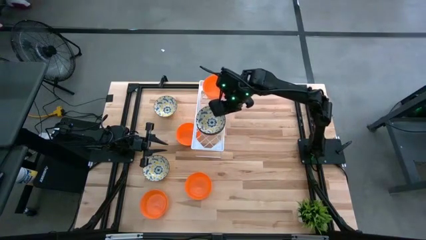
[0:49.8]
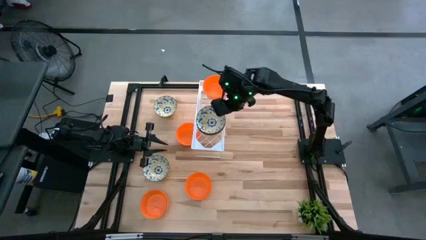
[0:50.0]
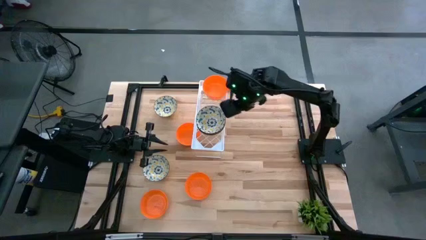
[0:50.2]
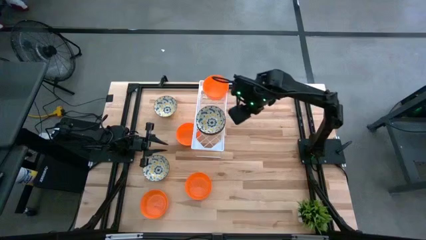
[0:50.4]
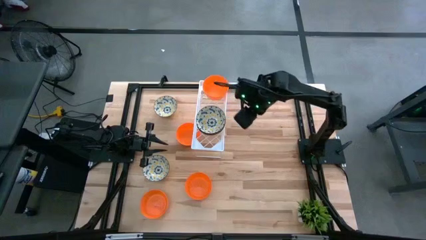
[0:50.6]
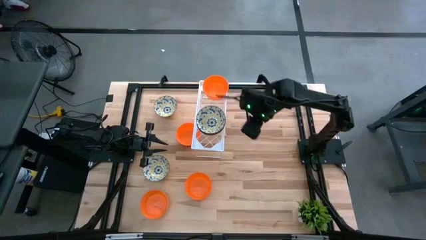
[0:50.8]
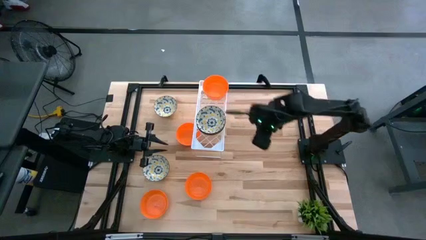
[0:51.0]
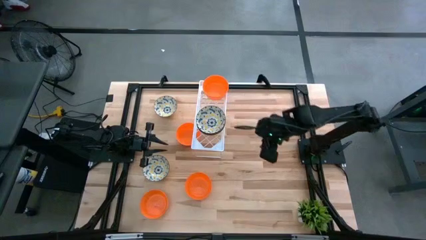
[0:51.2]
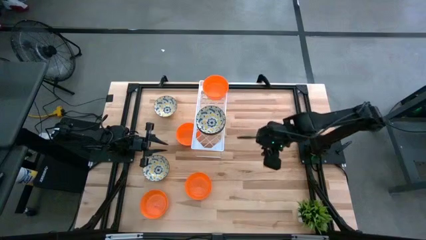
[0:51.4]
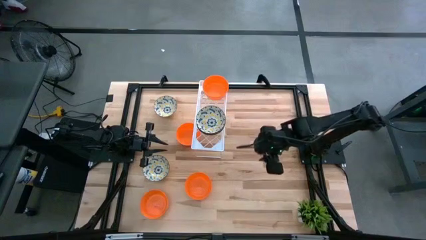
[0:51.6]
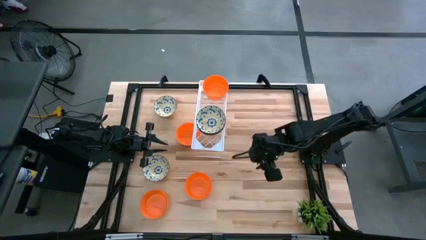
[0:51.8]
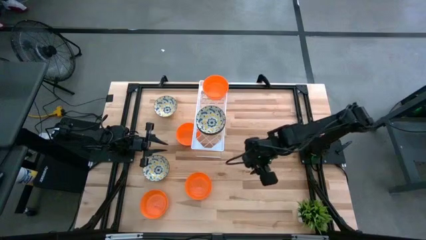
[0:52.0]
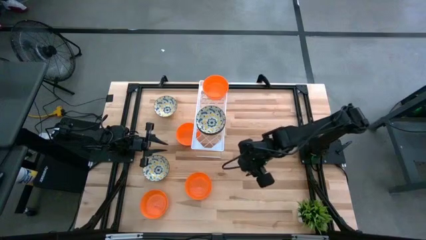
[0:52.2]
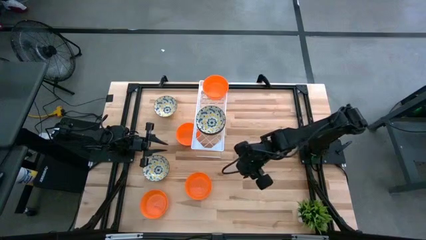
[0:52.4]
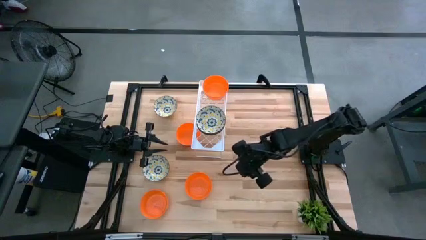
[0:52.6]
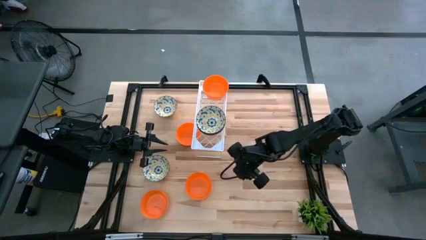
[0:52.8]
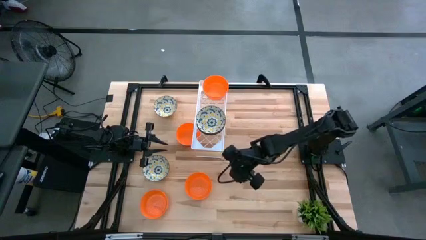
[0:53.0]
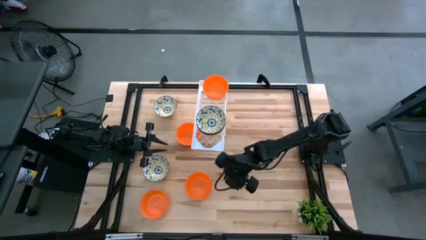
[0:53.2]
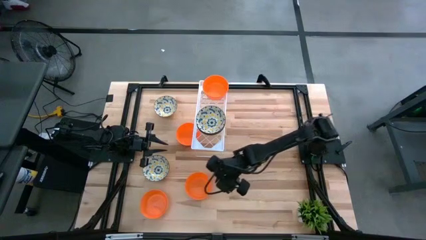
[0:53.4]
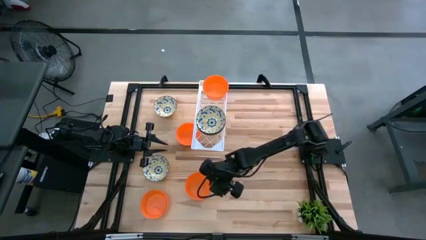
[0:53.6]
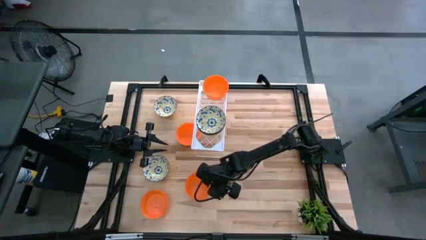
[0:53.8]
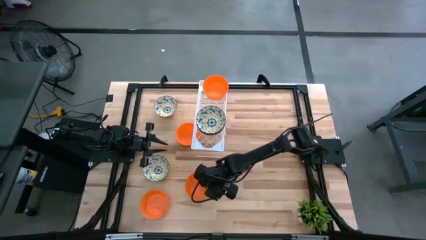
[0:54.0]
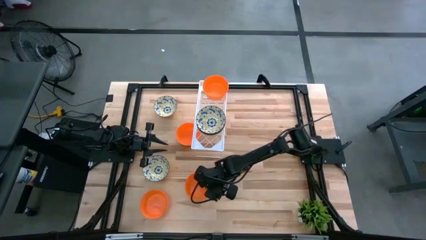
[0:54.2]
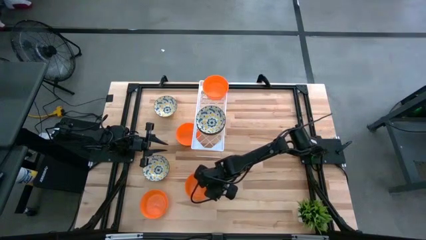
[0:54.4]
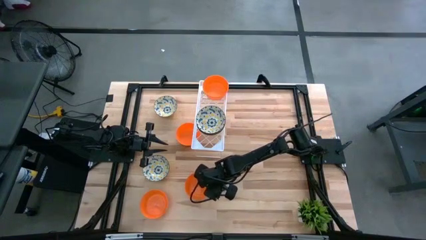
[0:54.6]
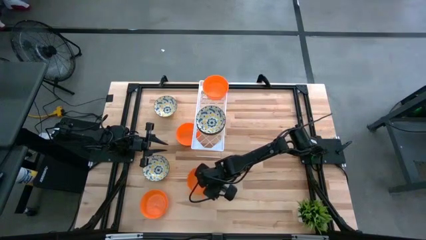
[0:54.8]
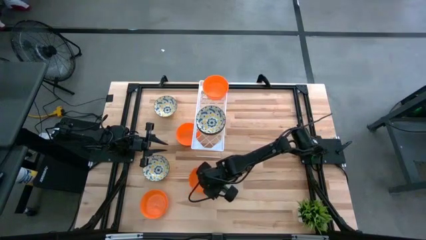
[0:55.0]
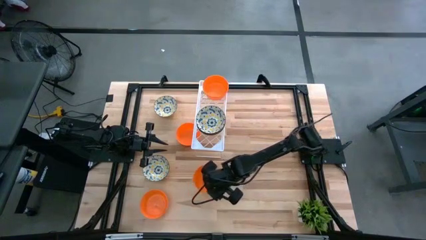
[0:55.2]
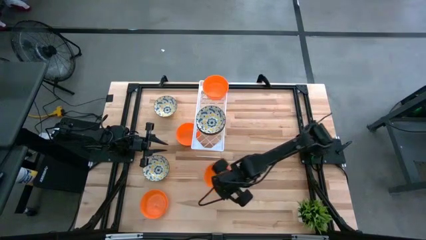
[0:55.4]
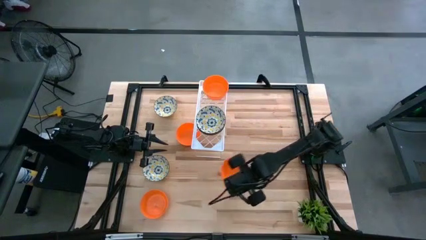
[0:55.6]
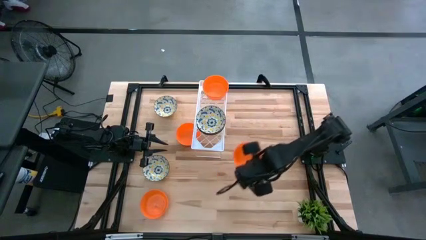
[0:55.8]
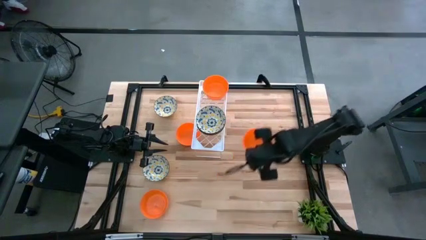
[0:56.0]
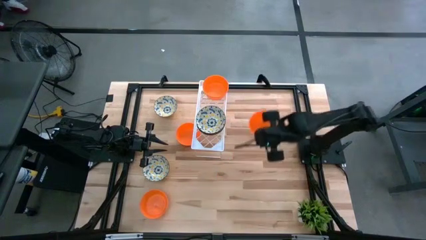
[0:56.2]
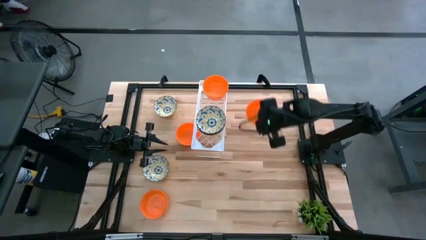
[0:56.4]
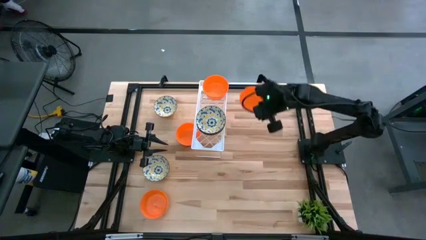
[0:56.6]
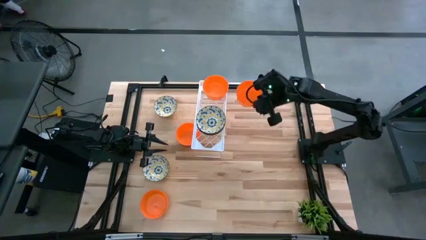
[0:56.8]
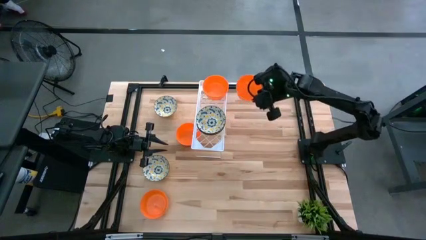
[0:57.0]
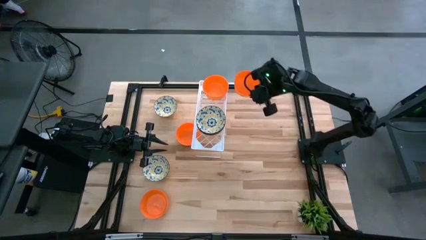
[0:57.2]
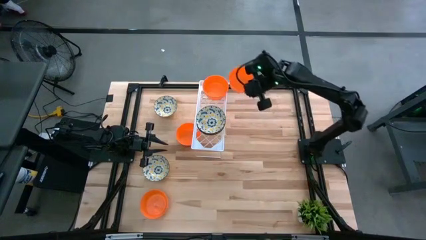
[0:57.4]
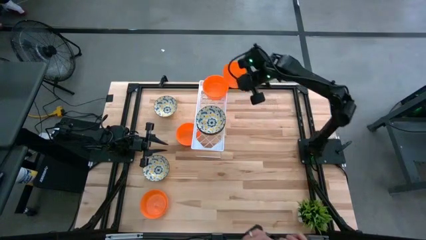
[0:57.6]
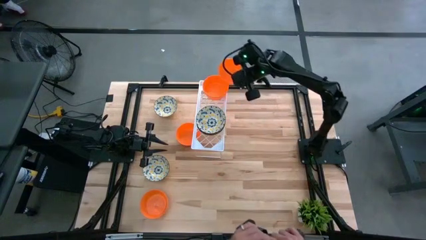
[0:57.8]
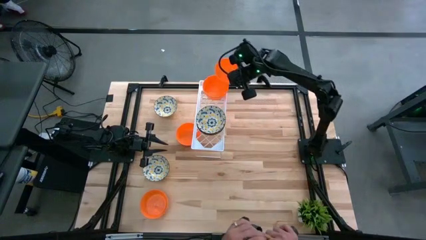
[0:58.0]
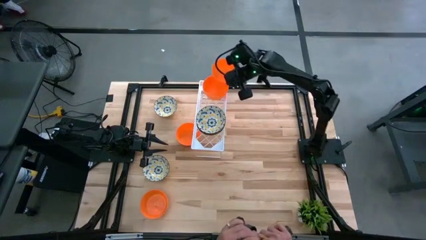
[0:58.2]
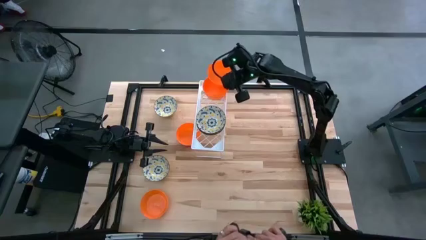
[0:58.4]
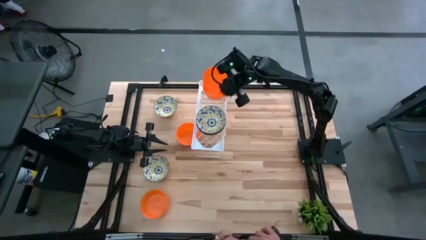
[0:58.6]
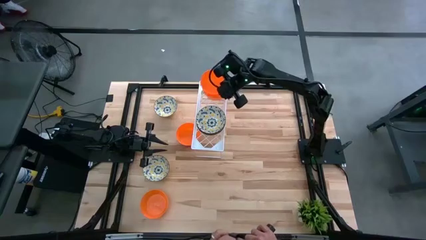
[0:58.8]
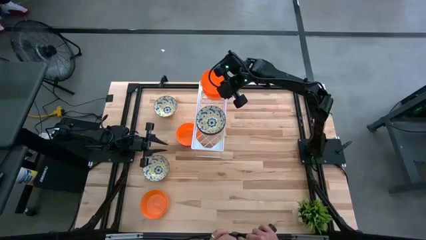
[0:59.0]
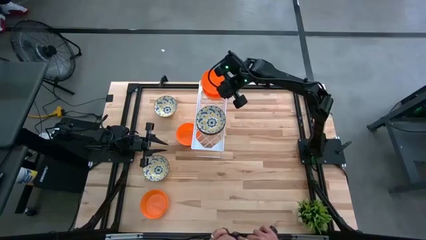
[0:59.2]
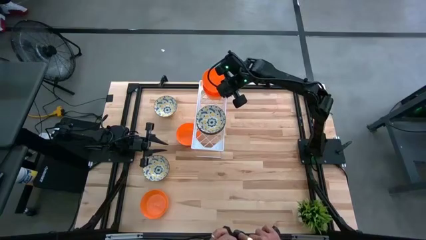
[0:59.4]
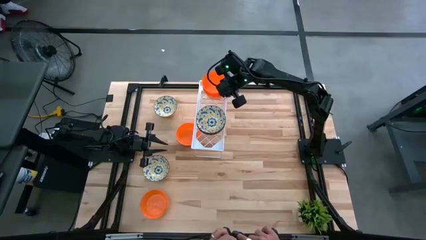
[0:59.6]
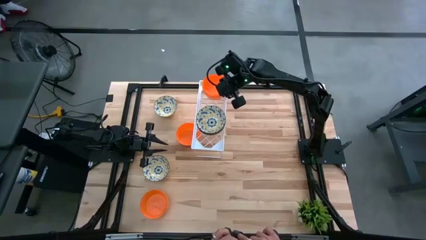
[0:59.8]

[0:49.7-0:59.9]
Task: Pick & Place Mini bowls
Stack the orange bowl on the stacked orange bowls on the shelf
